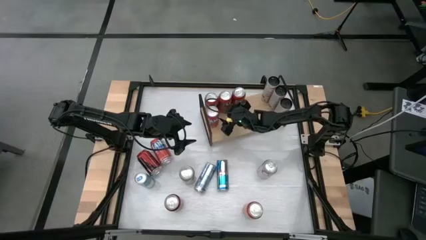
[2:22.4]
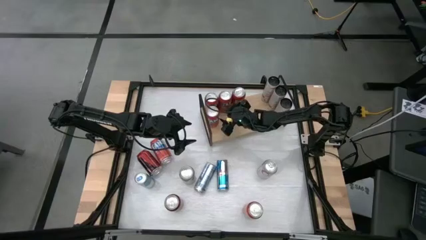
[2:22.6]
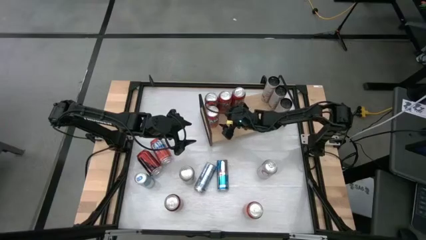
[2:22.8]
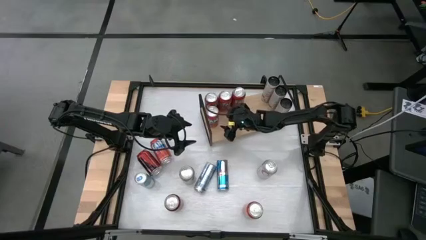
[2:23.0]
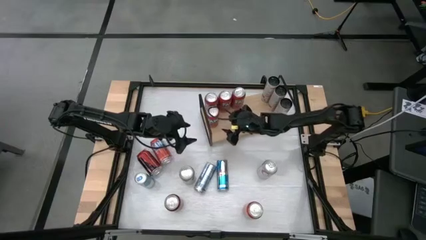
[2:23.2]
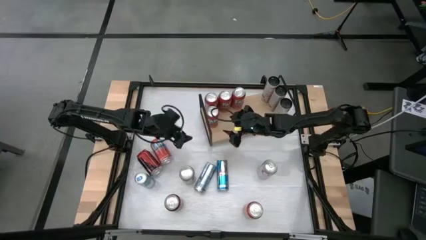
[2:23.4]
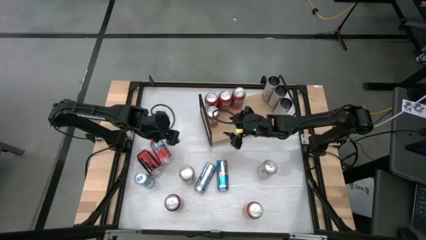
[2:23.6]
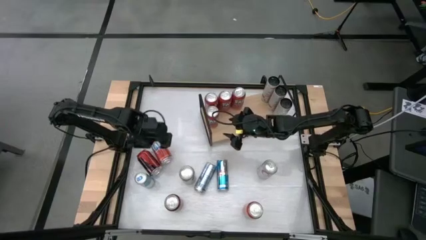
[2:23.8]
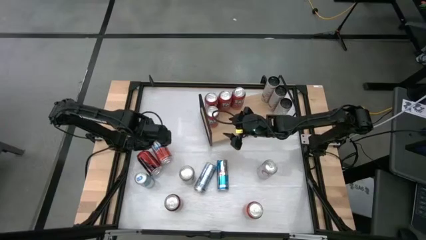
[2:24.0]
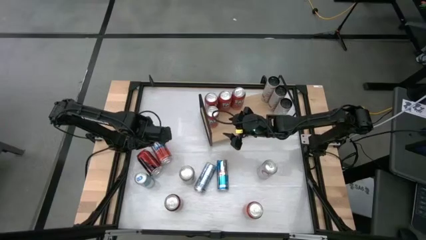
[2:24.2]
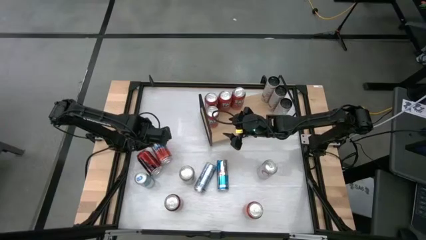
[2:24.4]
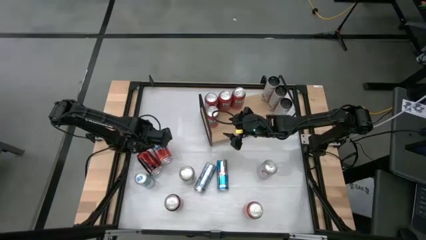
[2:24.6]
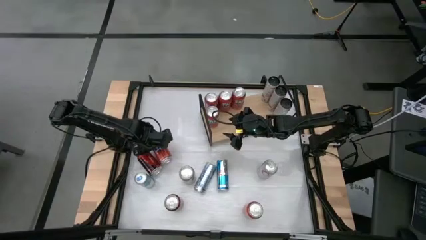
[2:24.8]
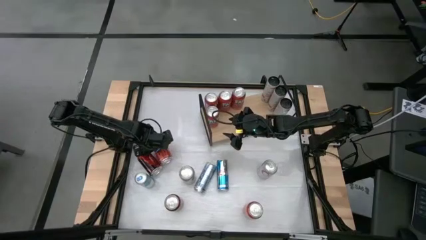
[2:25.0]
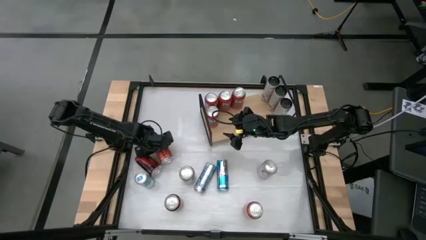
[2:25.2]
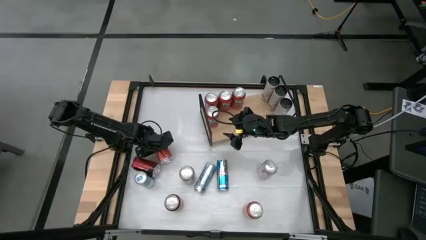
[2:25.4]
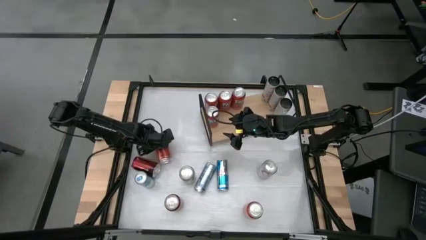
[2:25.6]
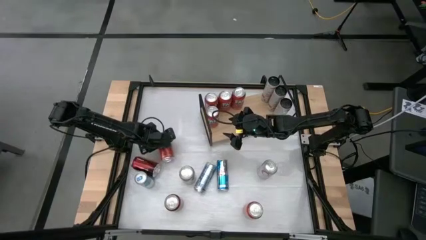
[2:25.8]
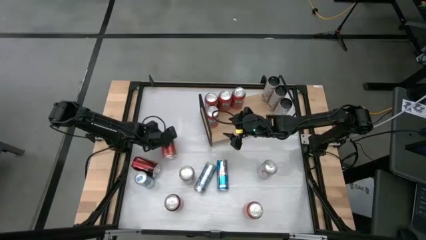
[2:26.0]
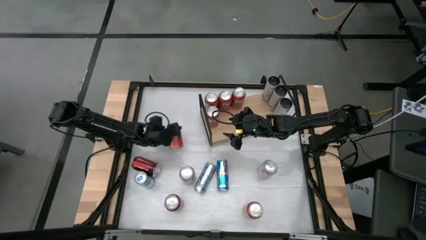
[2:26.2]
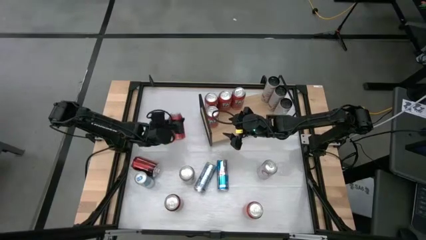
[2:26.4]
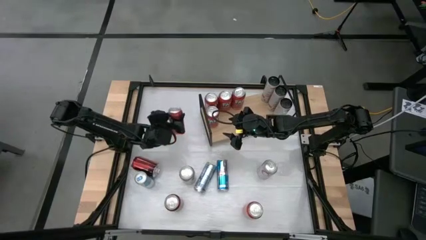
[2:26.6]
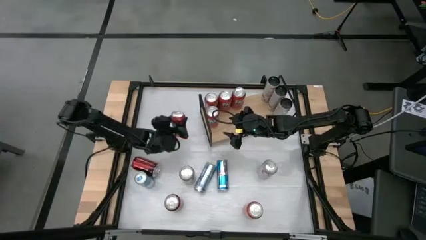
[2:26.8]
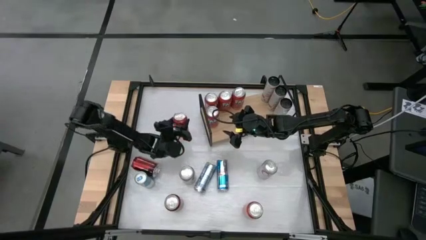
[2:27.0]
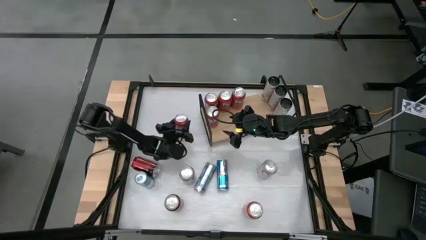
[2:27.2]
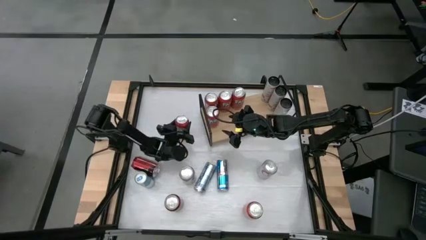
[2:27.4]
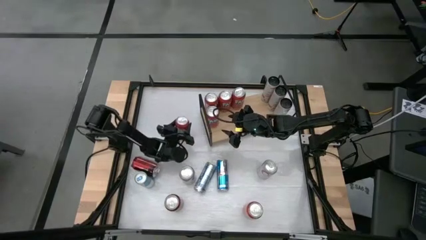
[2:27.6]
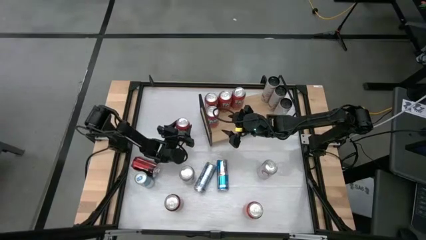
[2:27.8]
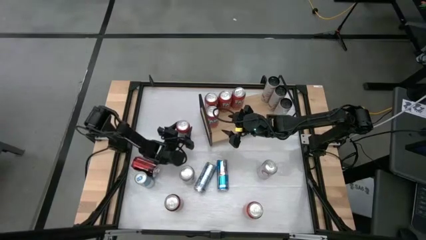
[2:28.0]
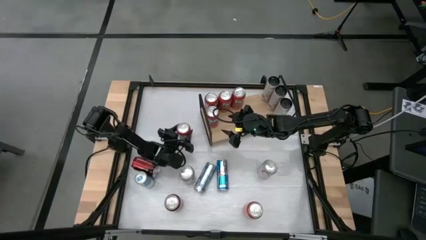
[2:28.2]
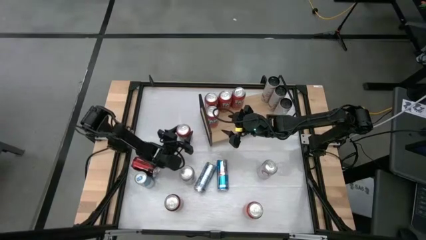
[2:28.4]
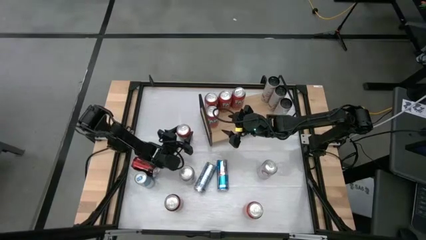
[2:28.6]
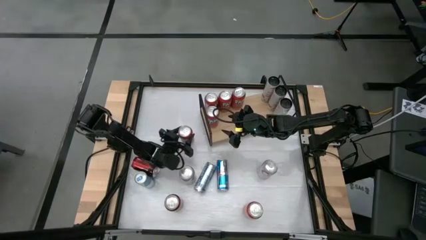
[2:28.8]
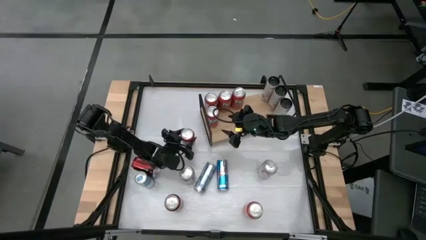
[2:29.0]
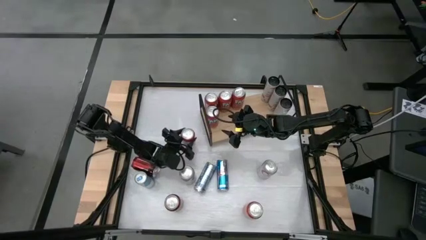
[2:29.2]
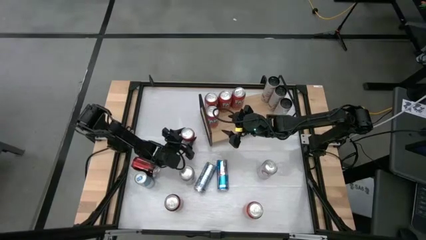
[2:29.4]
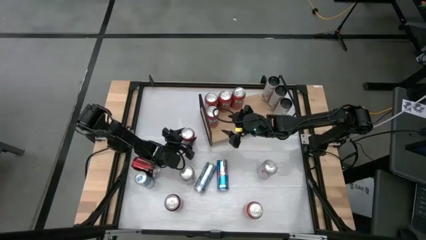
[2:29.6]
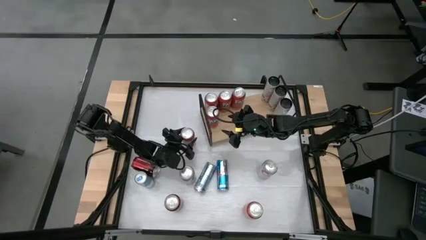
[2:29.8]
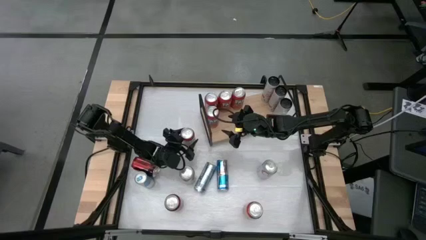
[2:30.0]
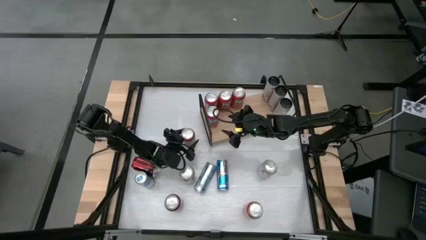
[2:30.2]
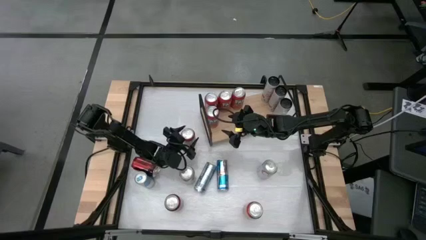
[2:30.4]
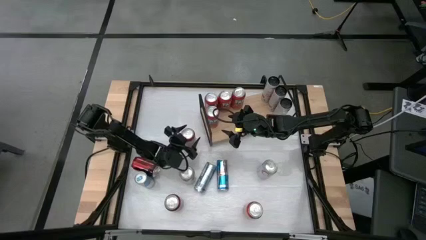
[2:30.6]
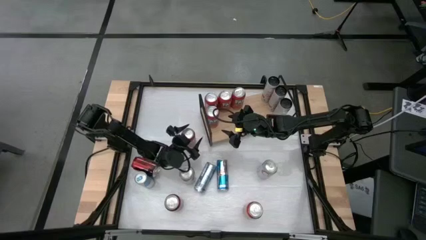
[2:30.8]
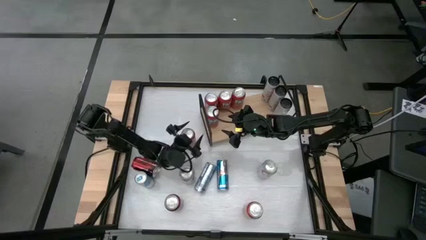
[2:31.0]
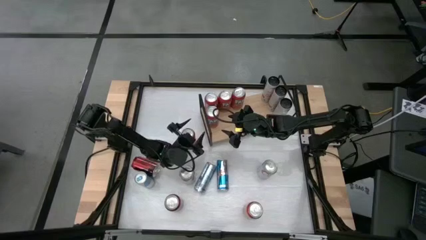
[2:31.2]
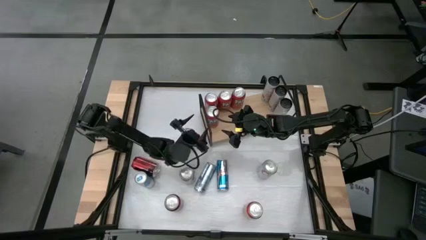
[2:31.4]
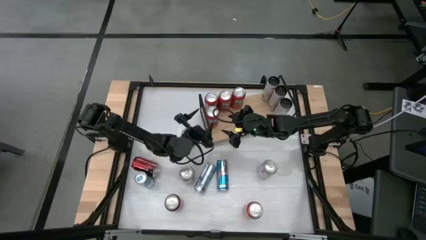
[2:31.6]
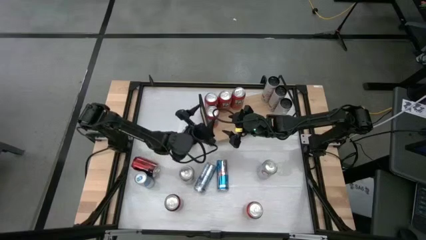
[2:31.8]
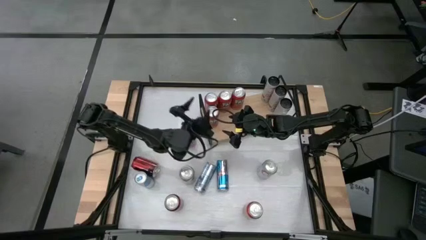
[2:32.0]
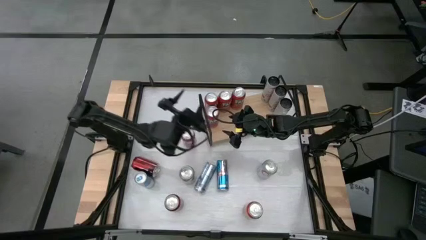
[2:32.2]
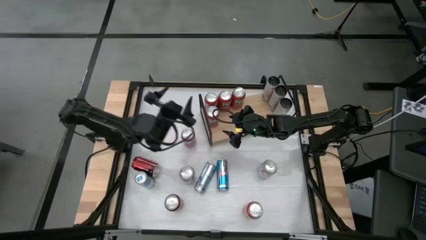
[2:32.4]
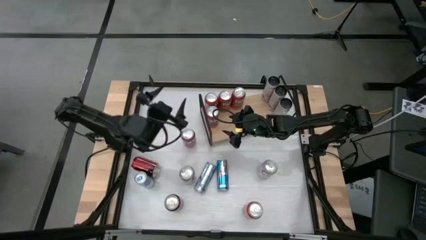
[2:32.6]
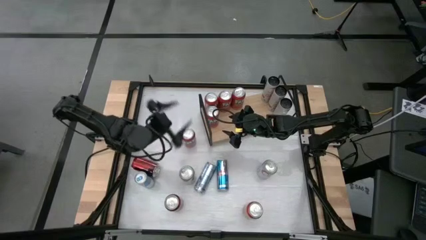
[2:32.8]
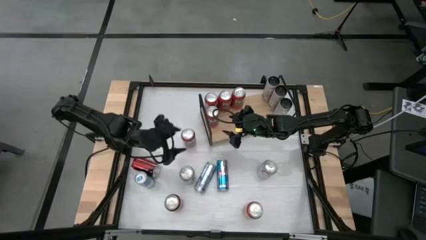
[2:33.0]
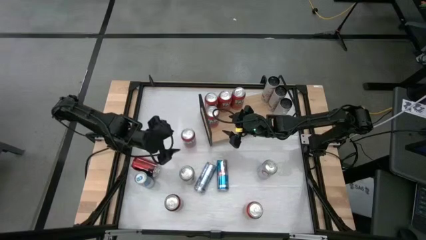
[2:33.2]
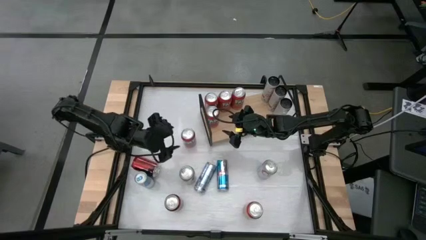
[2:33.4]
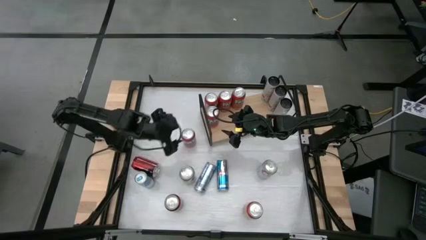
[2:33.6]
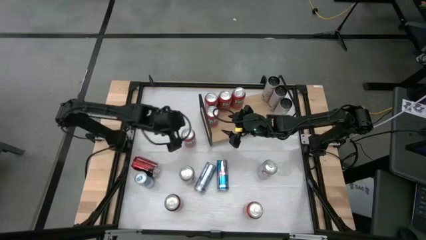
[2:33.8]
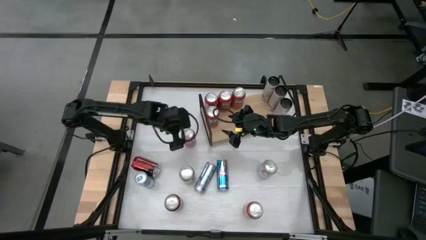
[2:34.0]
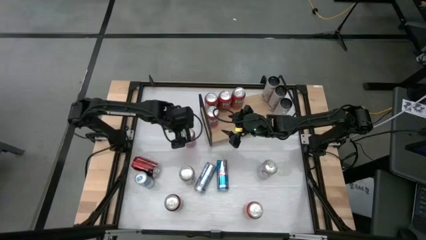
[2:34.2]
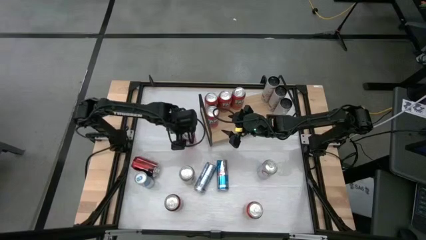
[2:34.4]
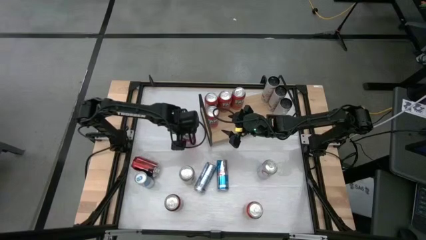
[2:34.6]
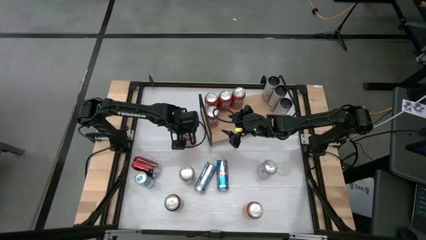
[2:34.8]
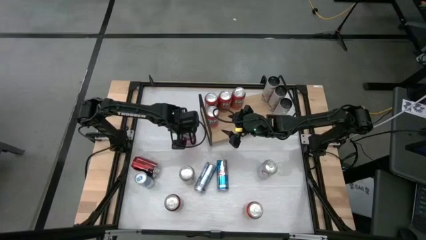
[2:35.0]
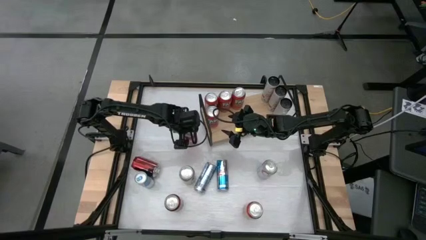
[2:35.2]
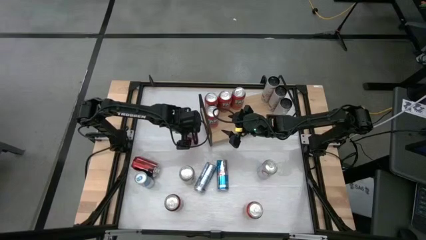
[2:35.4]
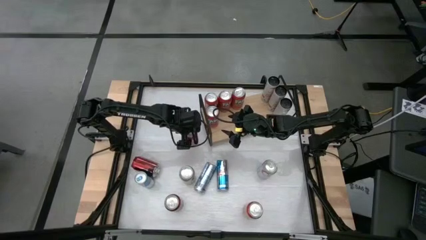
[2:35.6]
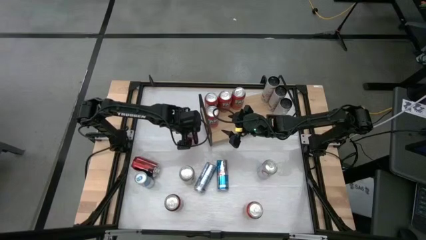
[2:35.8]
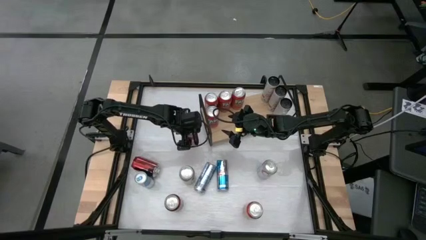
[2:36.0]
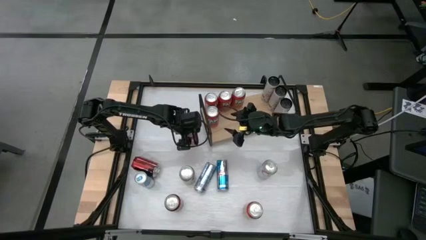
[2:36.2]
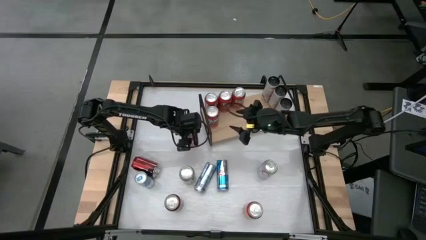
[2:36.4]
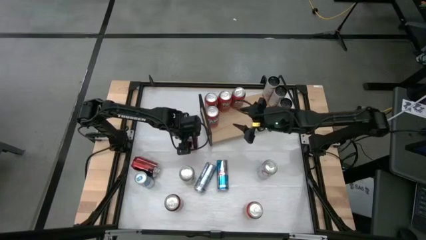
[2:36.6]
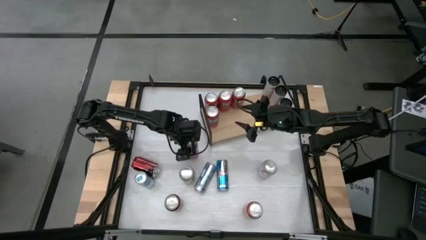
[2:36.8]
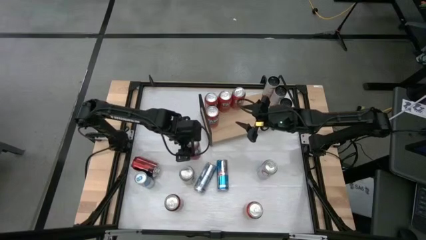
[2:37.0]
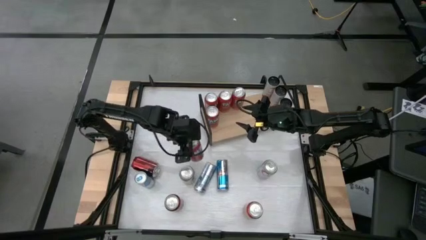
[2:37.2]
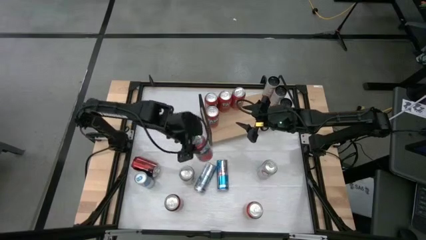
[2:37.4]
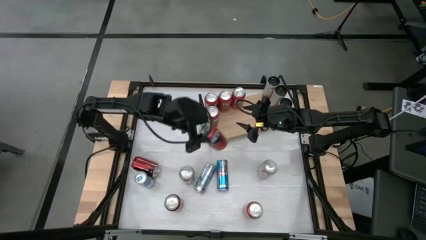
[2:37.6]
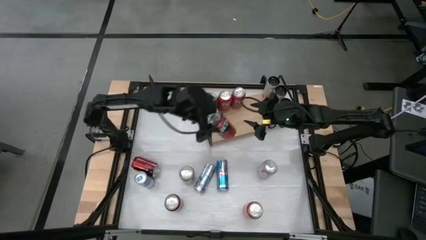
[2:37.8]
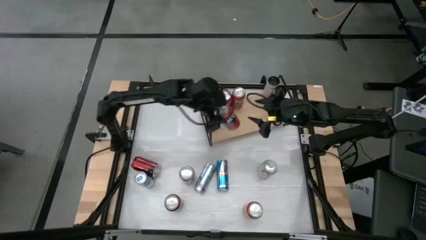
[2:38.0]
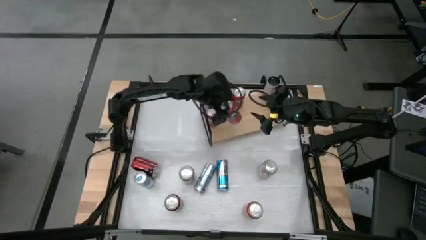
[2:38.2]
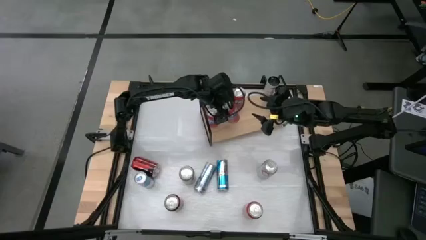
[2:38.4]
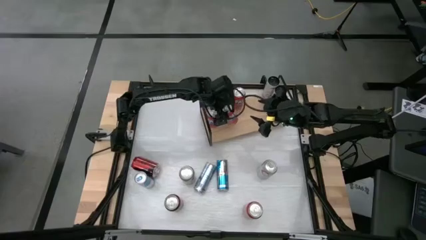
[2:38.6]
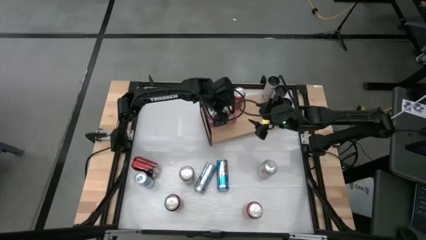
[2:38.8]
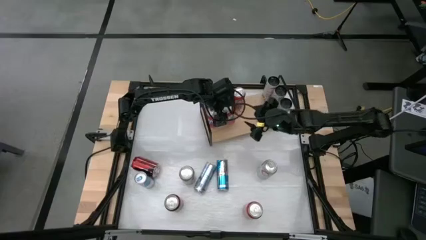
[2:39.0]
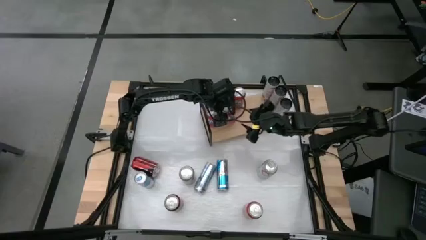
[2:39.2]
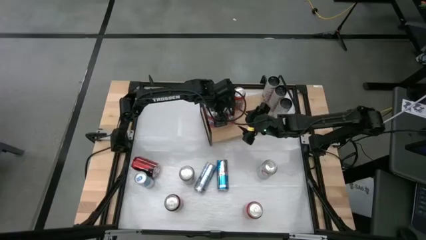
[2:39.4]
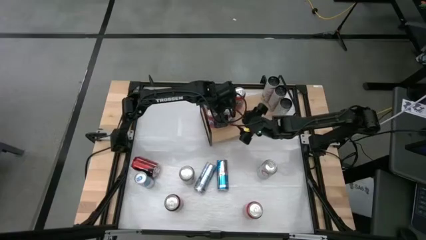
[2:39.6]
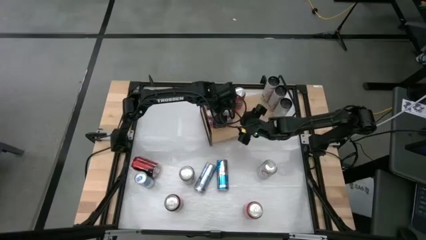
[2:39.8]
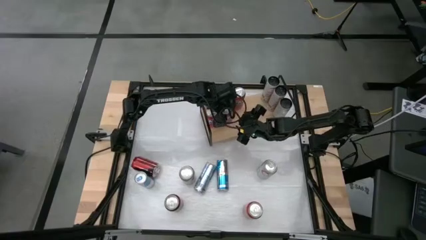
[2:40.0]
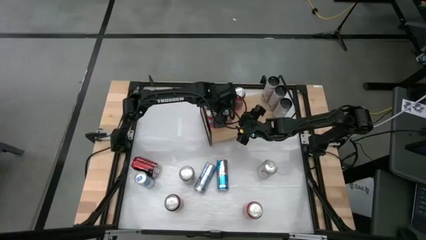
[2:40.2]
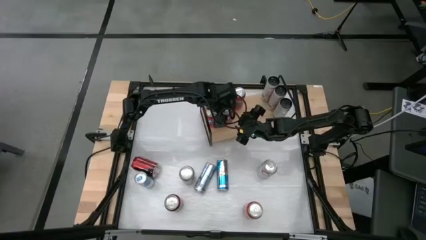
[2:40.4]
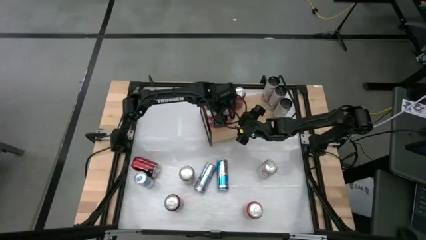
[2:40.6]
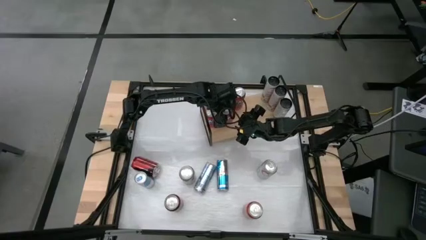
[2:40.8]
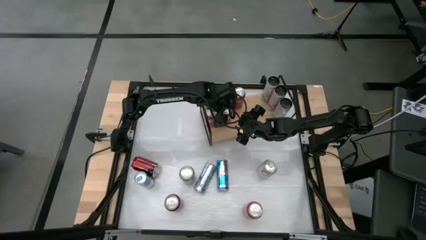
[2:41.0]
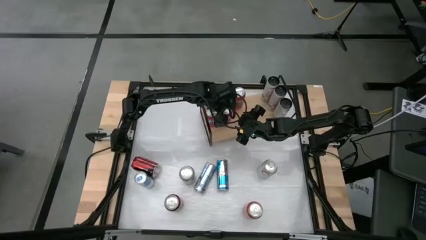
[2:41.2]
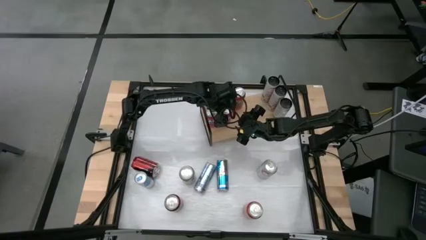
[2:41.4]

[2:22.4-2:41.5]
Task: Place canned beverage on shelf
Put the center orange soda can on the shelf
